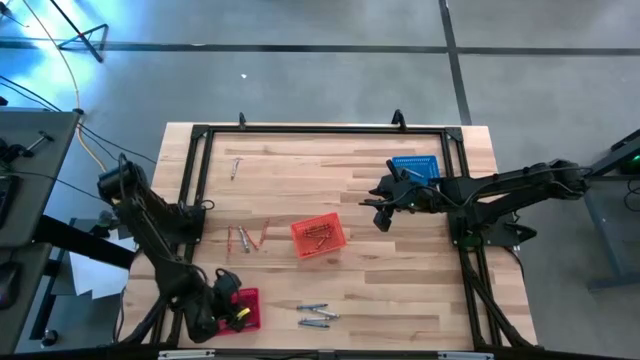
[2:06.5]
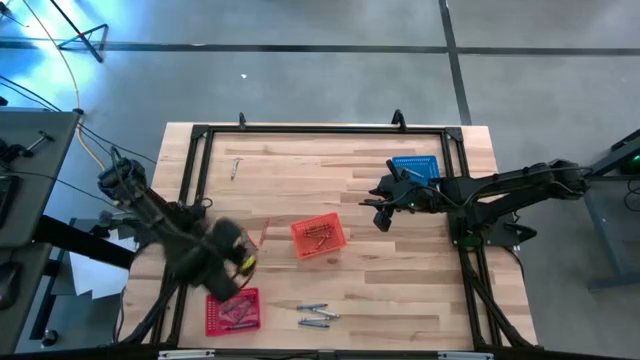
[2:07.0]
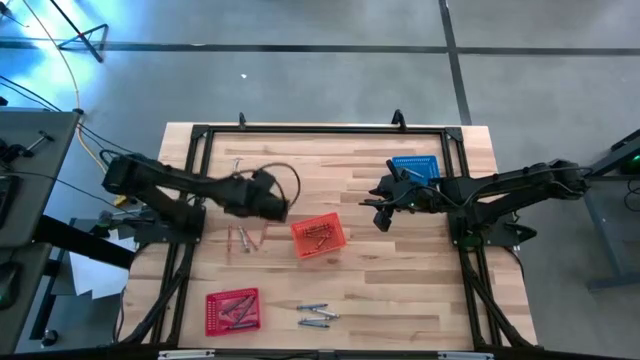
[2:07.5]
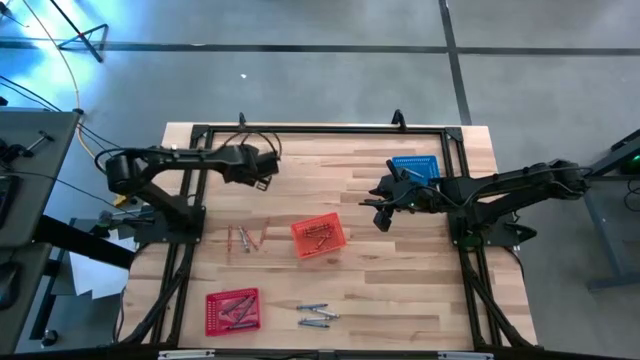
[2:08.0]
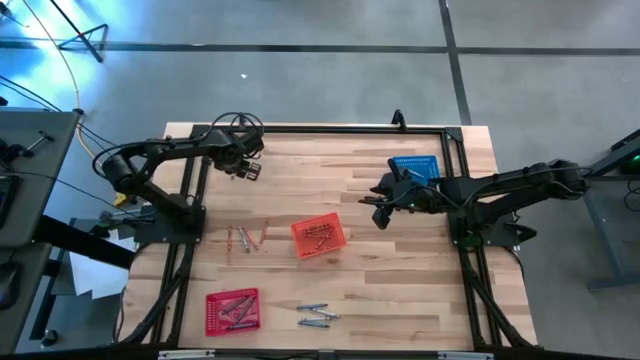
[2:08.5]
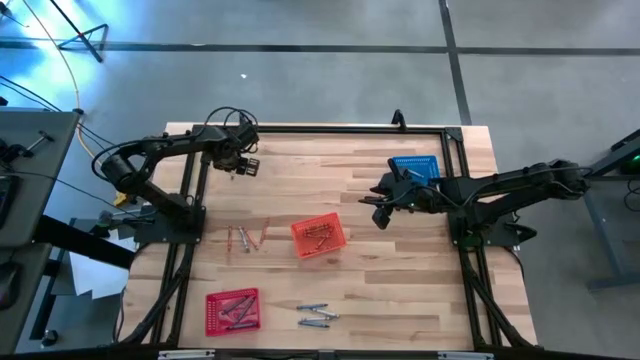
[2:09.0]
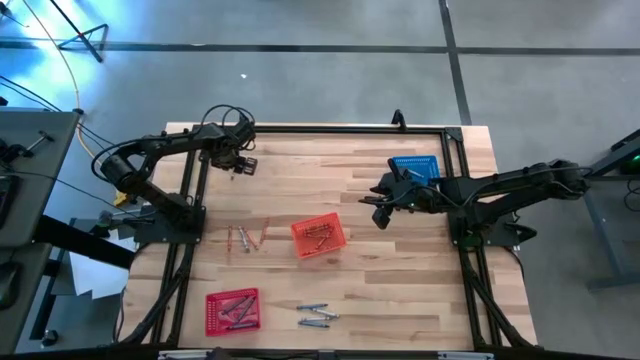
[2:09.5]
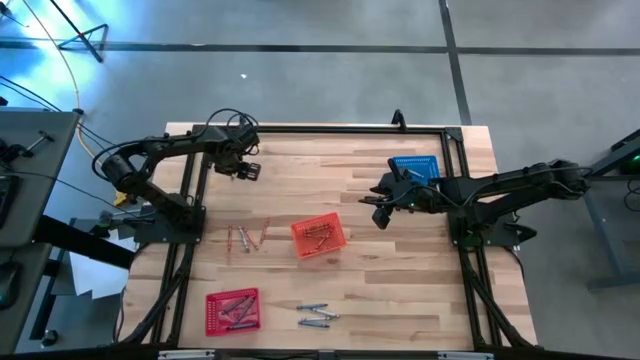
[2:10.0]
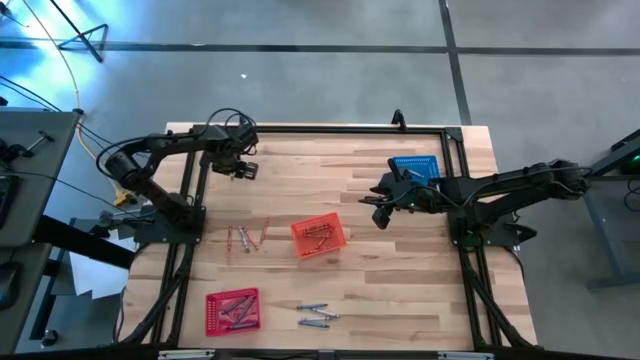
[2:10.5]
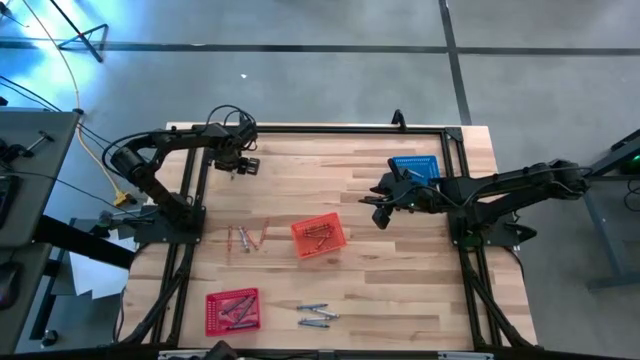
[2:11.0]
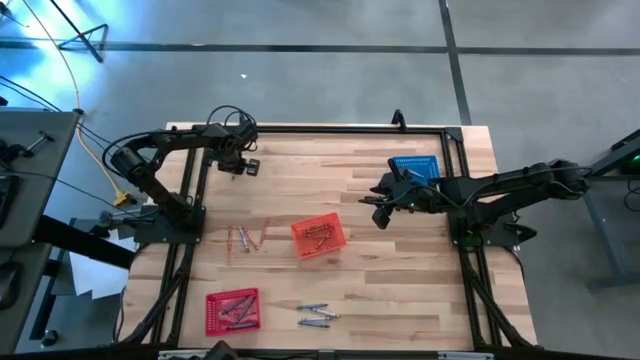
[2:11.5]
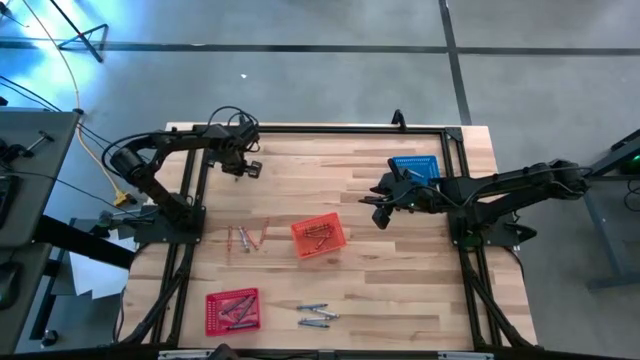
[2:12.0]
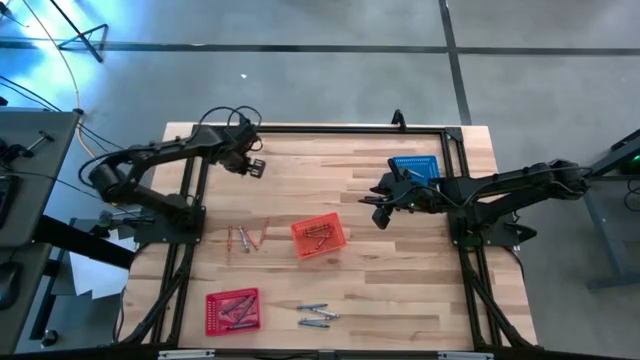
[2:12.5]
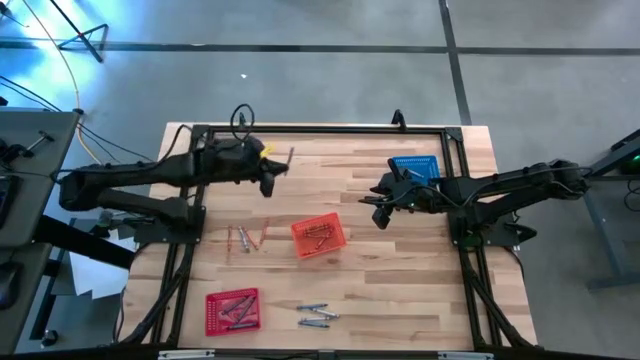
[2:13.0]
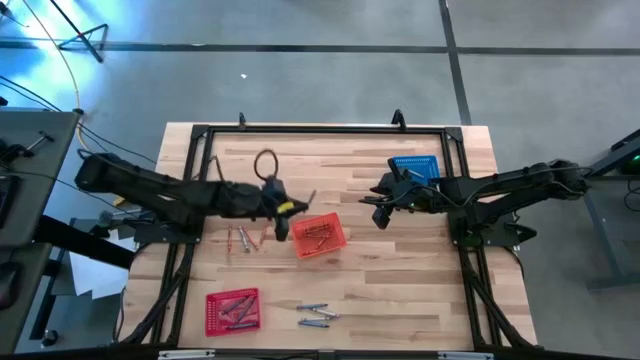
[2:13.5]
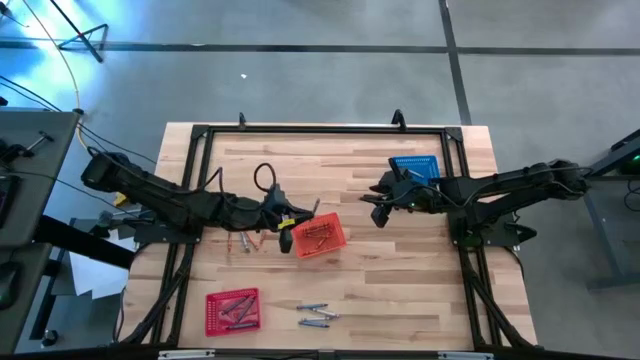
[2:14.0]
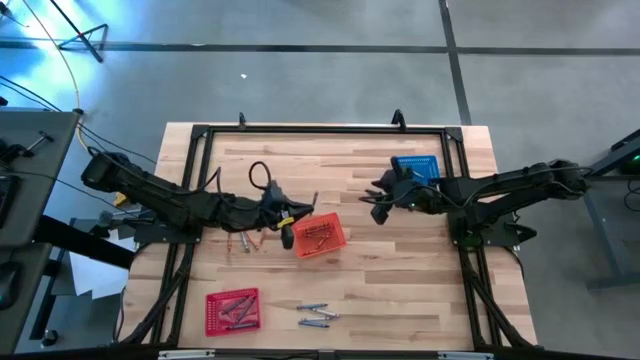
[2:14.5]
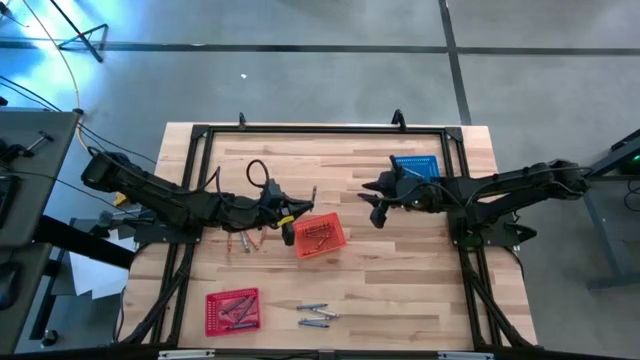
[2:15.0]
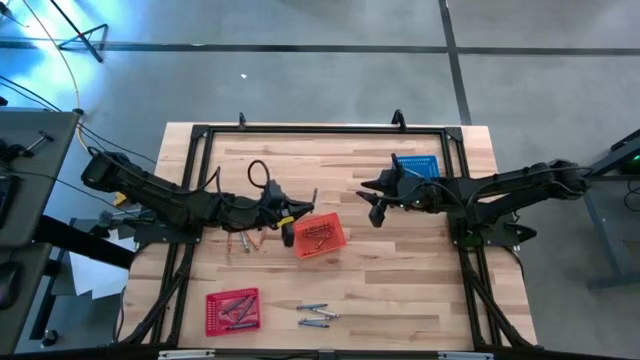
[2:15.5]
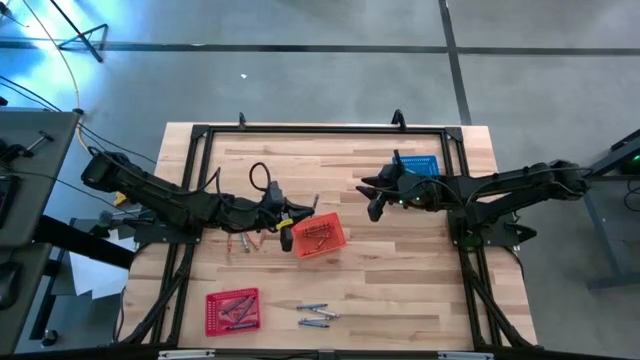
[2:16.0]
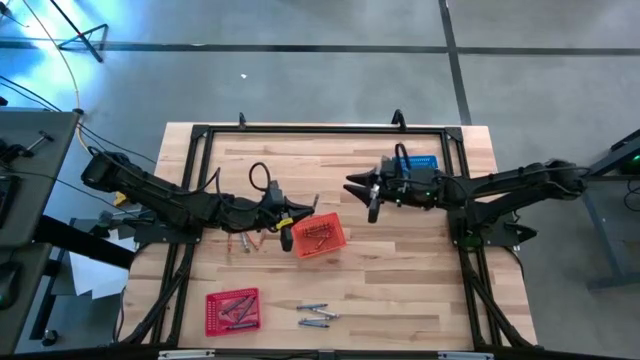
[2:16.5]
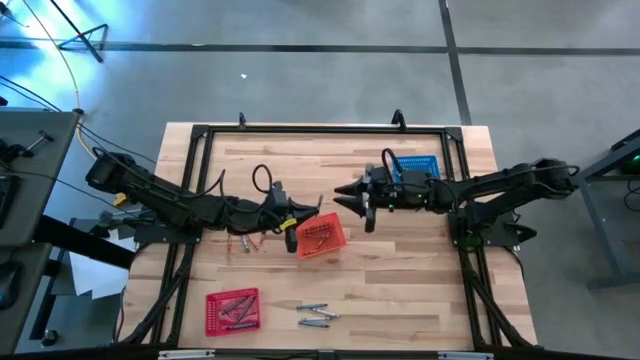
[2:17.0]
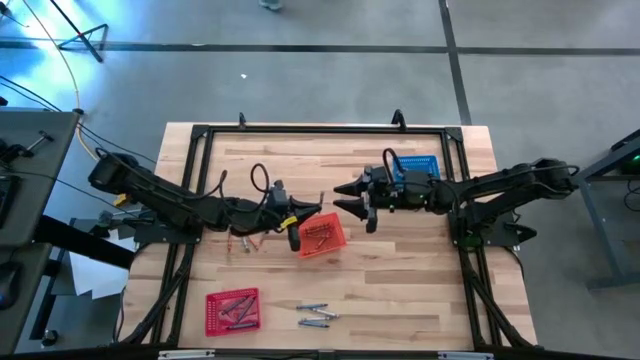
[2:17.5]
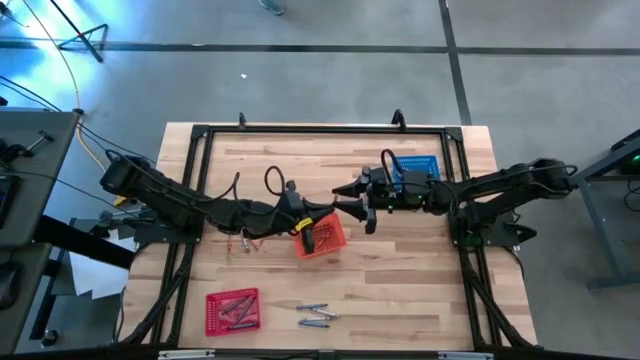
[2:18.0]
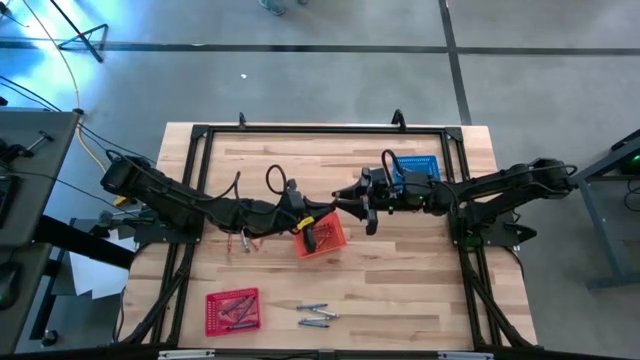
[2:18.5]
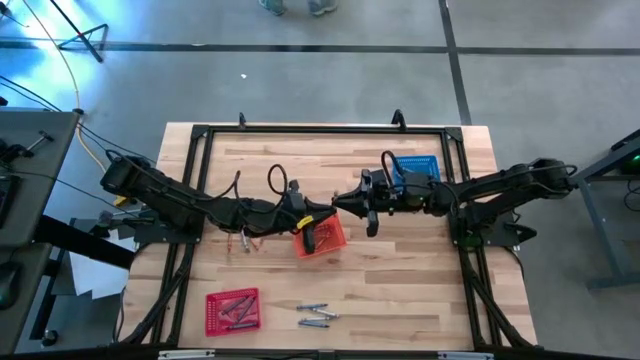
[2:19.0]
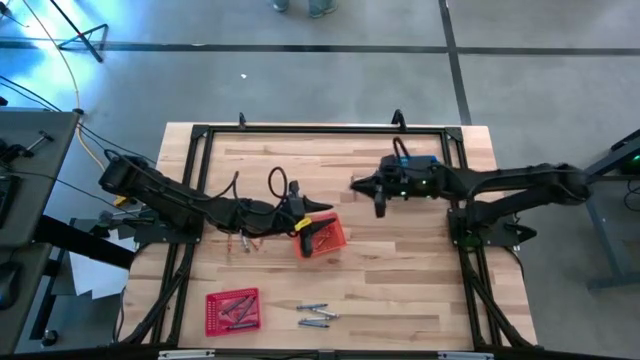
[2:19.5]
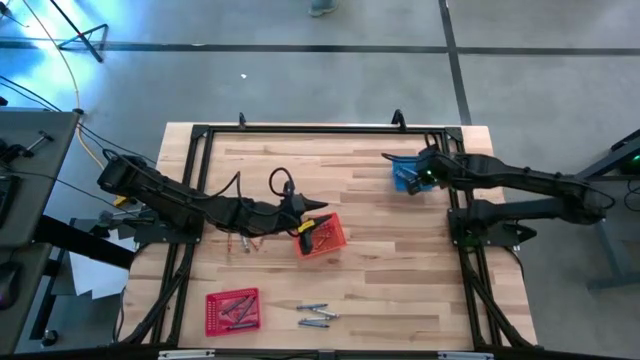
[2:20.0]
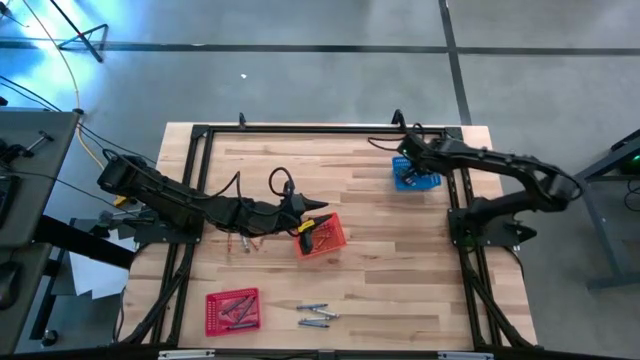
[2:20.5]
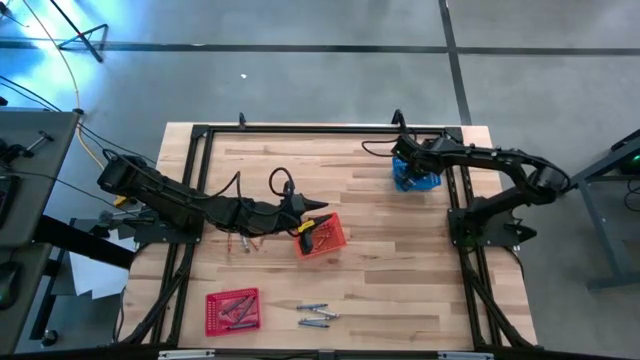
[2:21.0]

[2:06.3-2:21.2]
Task: Sort crayons
Put the gray crayon into the blue bin

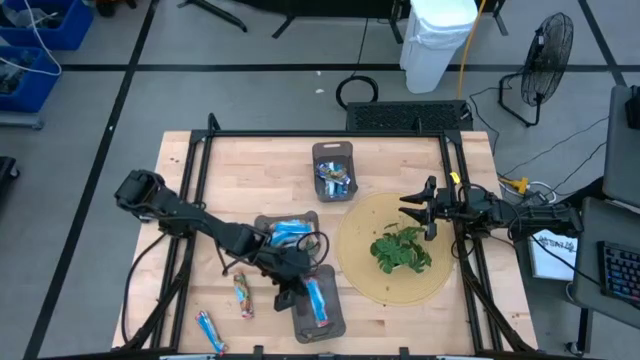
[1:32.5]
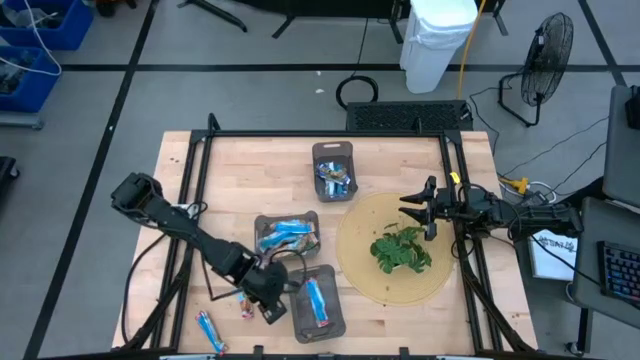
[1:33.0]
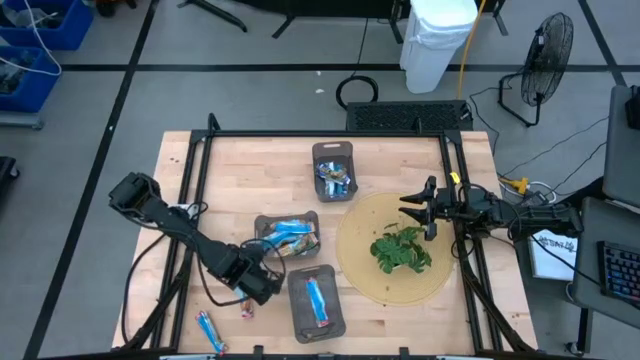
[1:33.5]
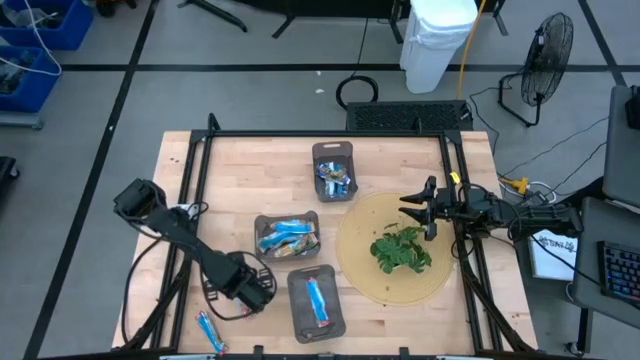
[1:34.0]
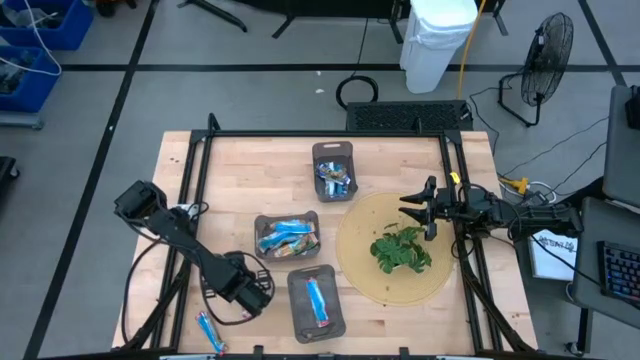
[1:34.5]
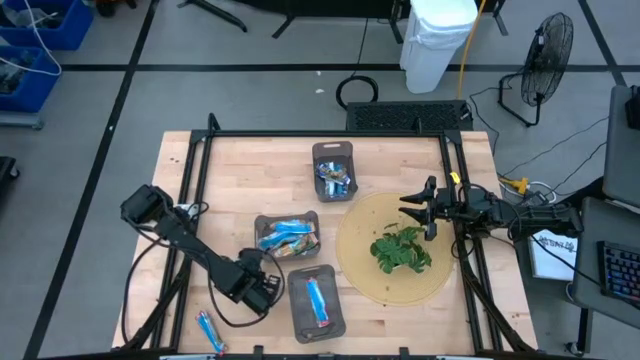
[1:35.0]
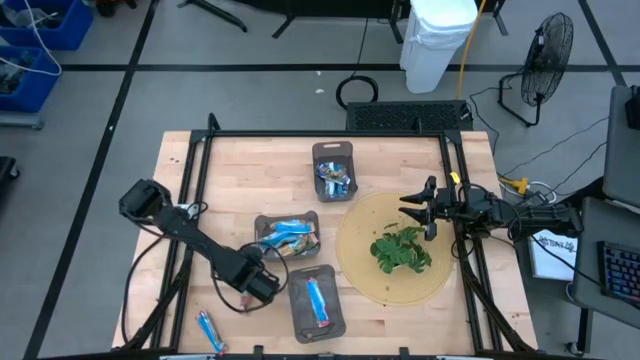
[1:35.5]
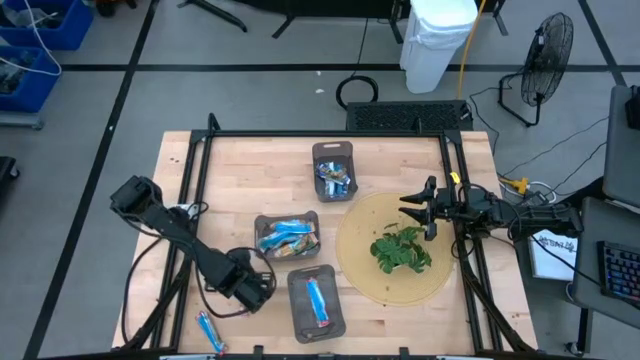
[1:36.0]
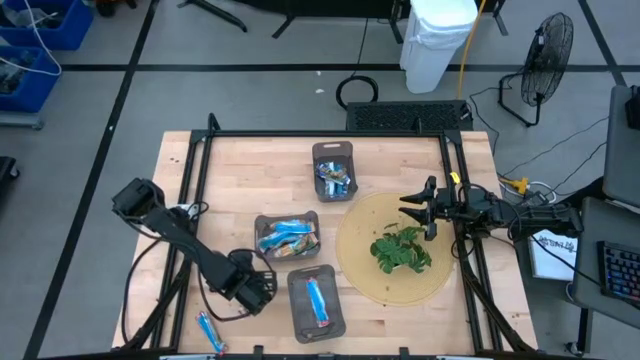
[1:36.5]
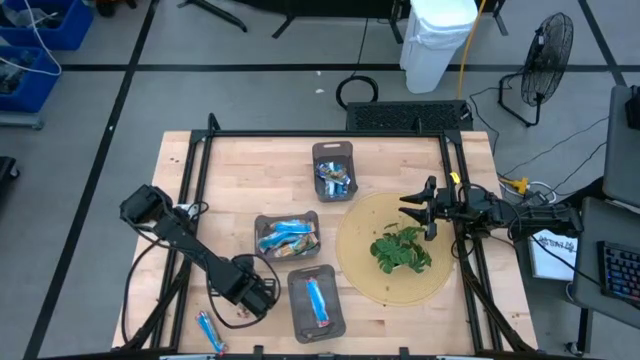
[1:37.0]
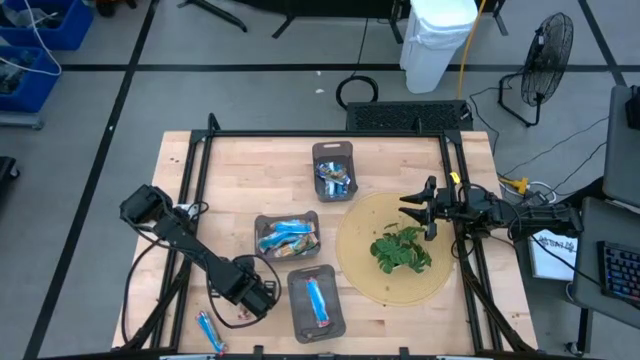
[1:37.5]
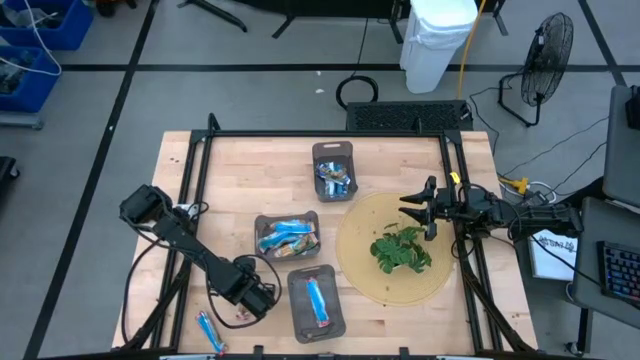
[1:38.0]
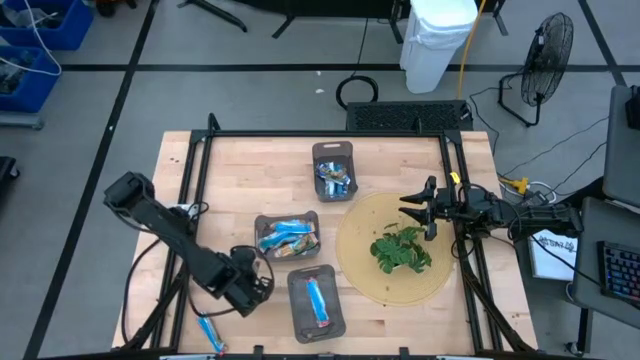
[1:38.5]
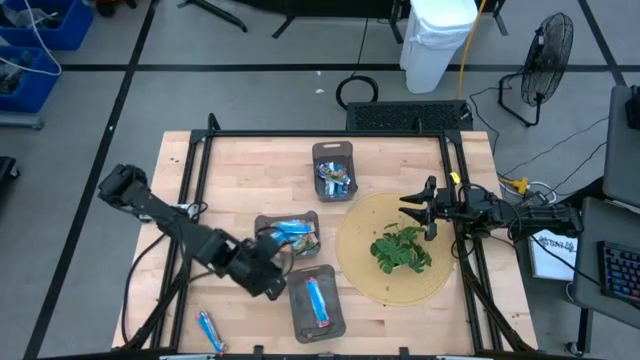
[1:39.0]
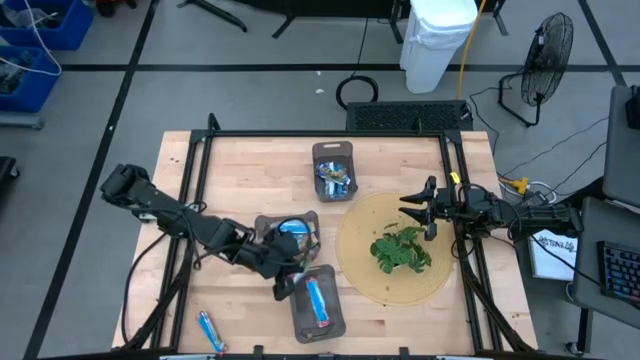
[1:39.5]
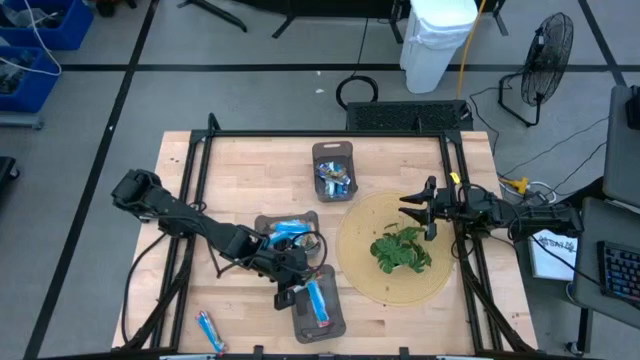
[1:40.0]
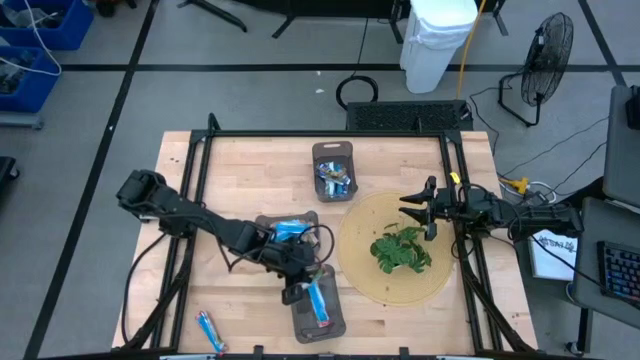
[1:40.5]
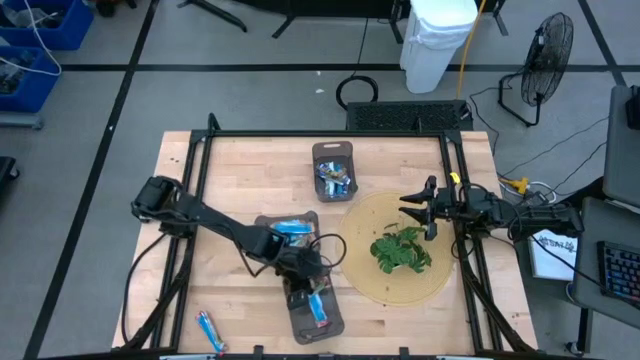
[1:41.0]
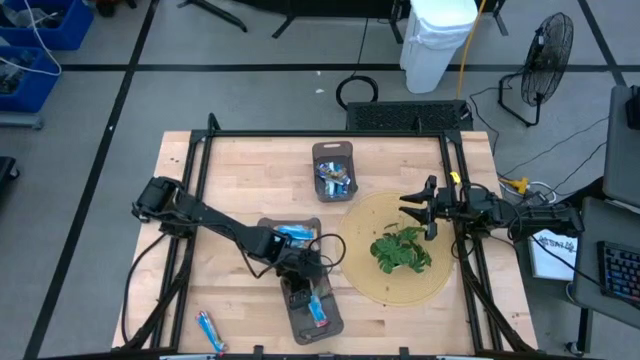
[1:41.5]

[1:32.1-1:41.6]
Task: Pick and place Granola Bars by type
Put the red granola bar into the bottom black bin
